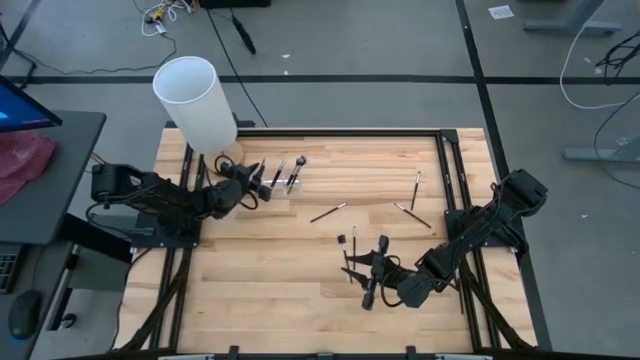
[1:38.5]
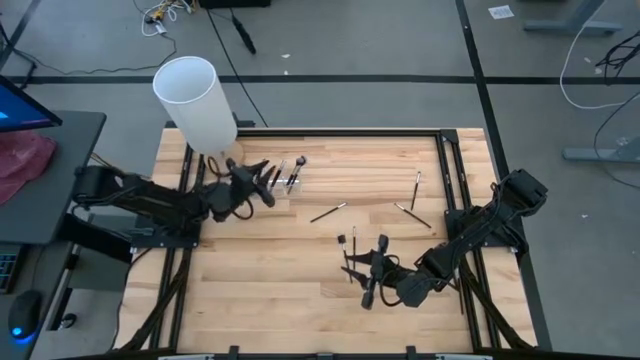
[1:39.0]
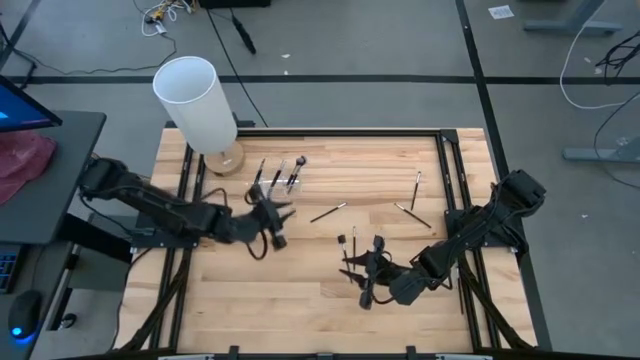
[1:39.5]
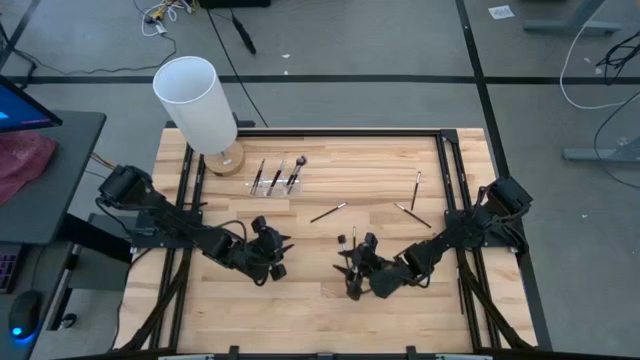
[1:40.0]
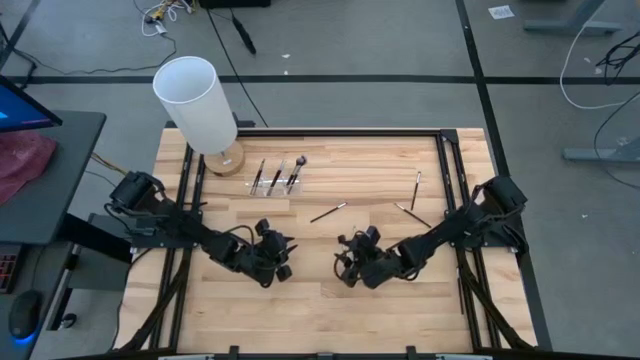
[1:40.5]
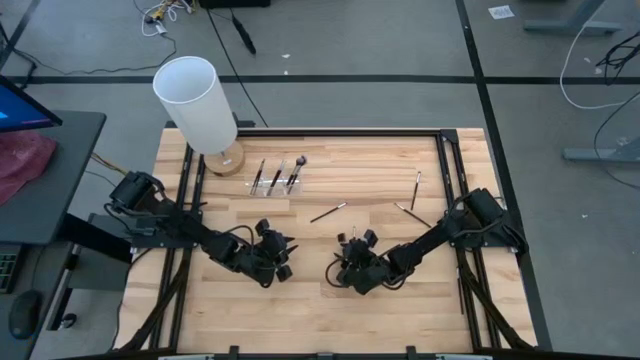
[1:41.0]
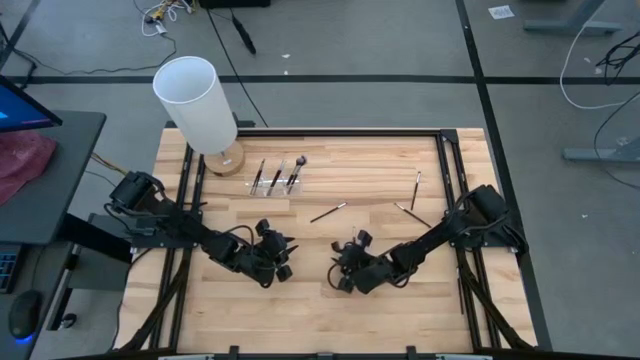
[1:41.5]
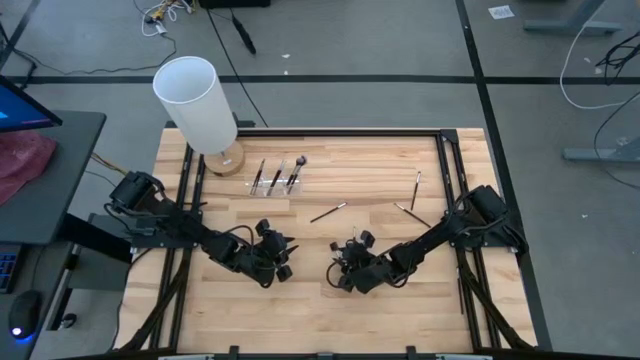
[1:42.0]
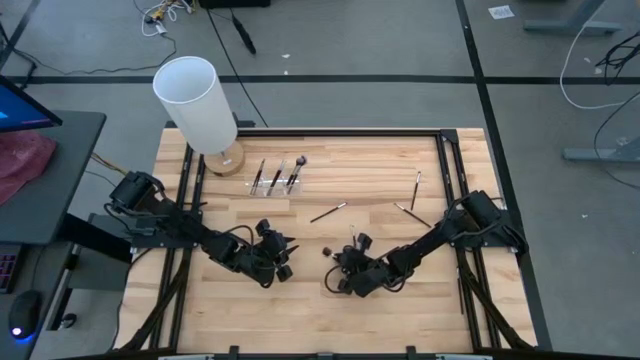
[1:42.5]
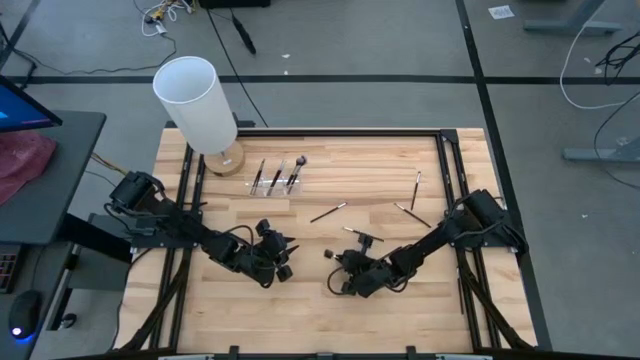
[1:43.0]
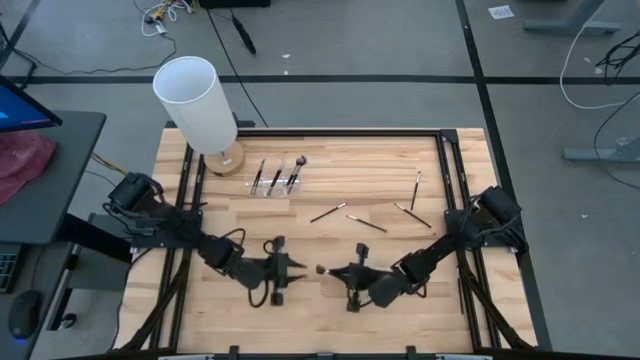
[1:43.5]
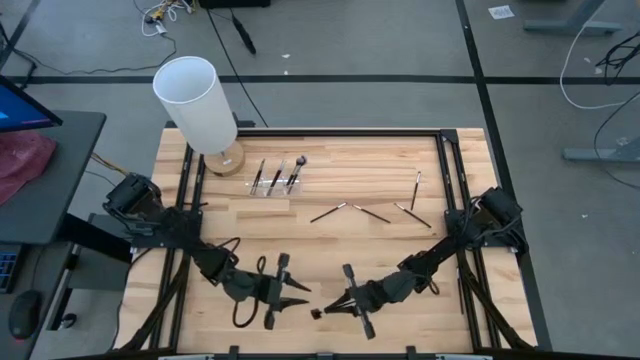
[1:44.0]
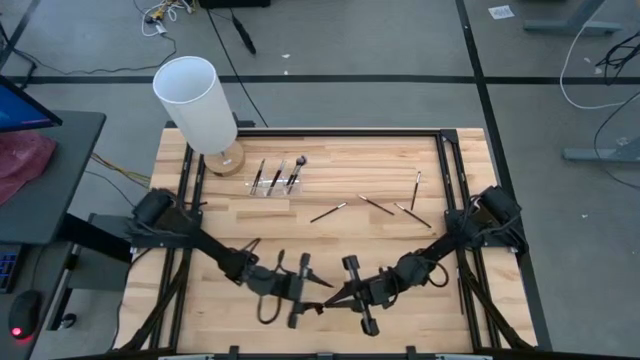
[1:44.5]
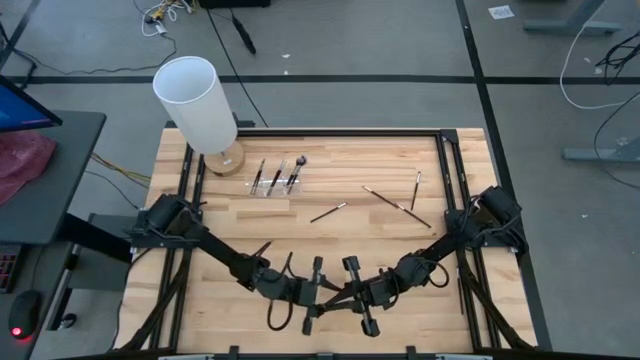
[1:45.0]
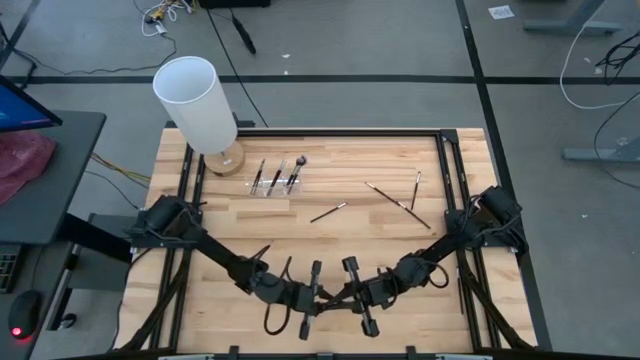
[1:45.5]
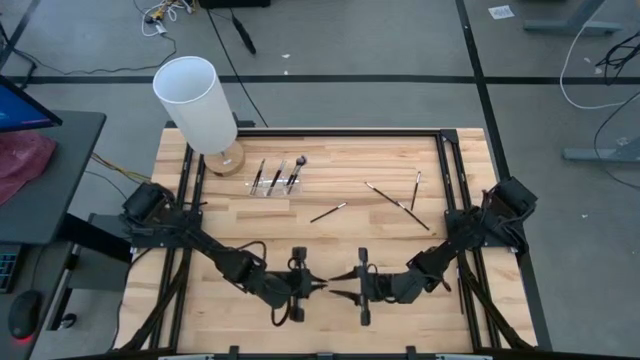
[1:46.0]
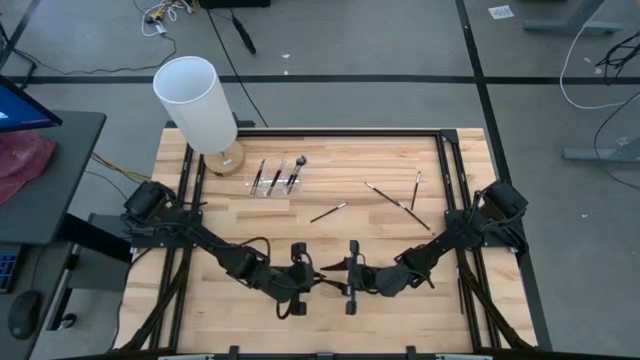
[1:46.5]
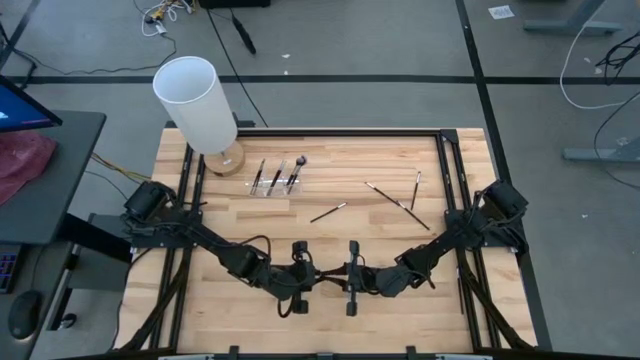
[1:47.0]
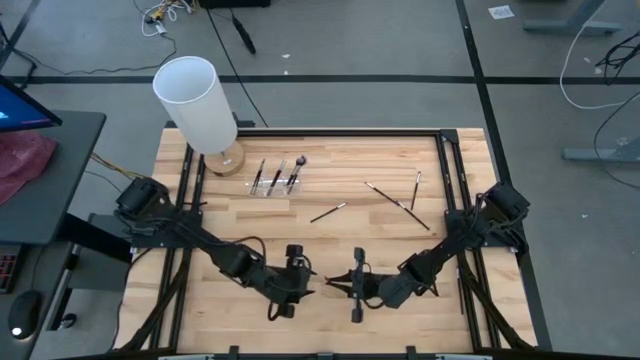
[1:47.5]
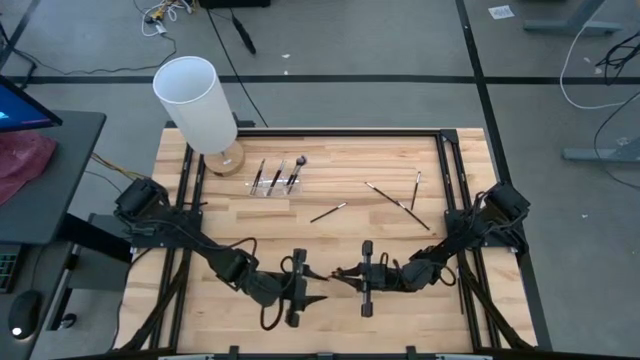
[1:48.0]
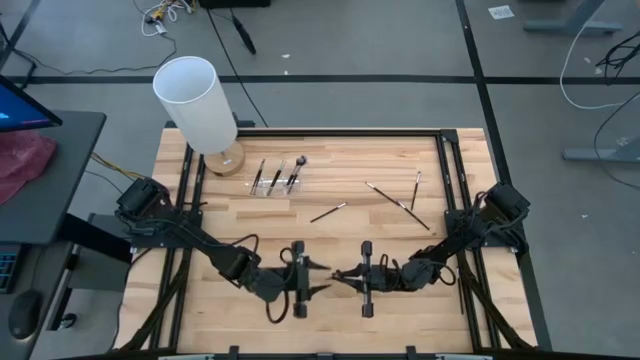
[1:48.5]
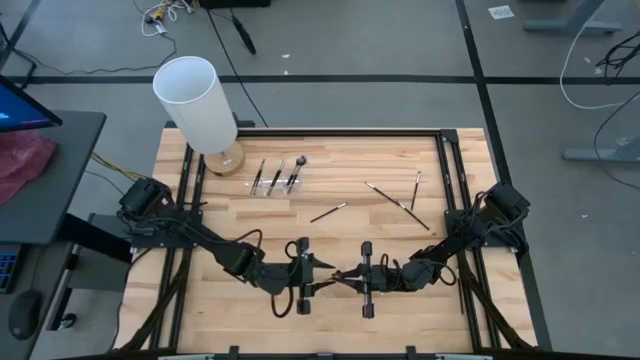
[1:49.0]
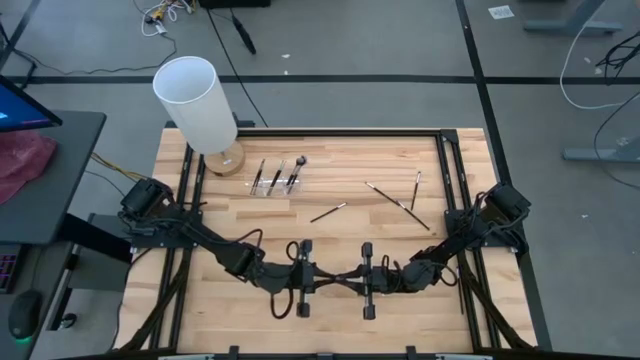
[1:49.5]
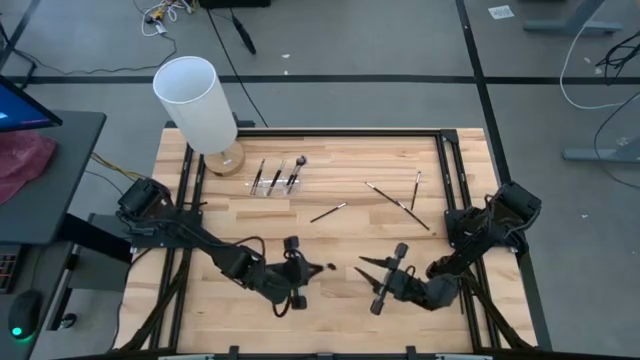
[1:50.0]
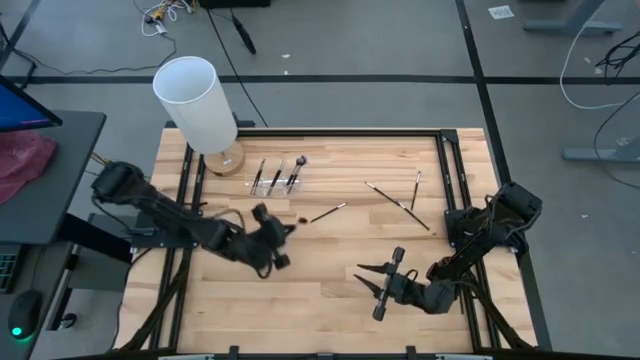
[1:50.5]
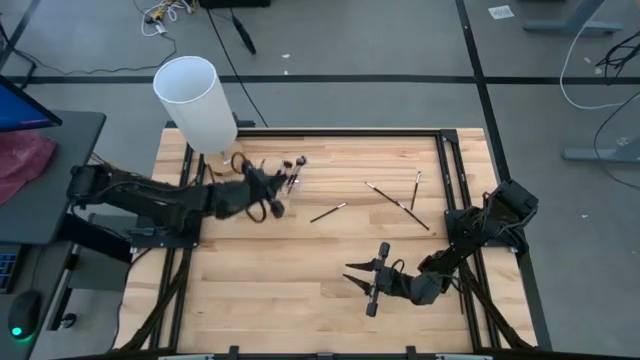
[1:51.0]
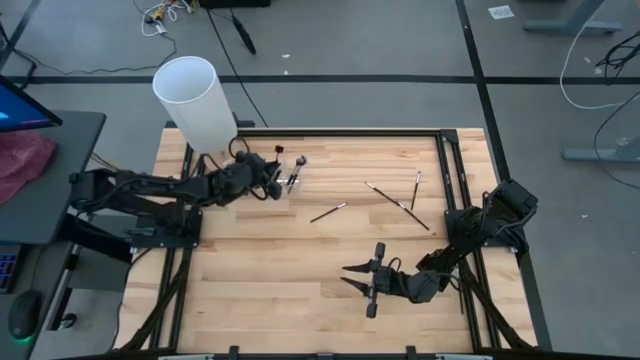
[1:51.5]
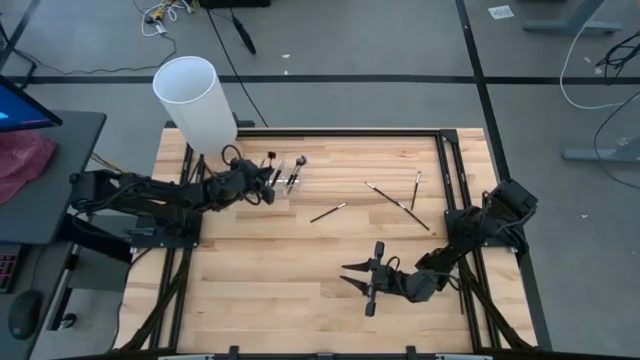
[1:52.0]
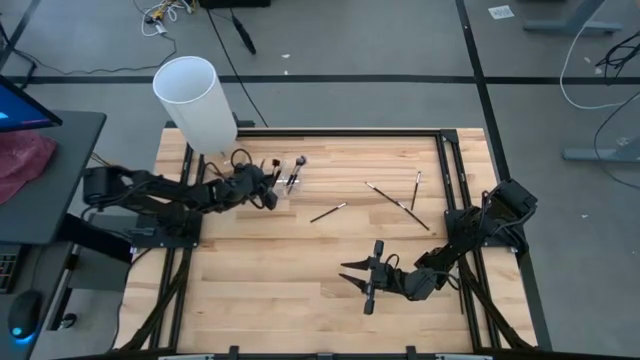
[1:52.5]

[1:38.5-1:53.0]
Task: Put items in baskets/containers
Put the brow brush into the transparent organizer

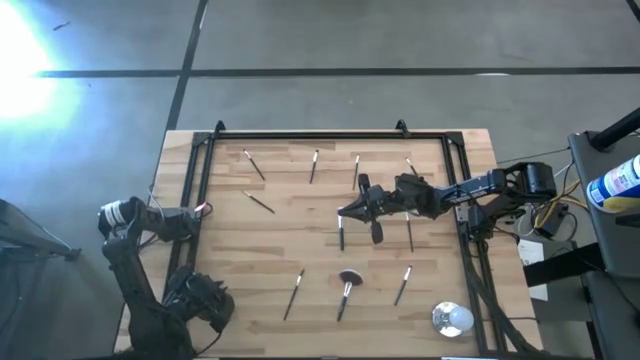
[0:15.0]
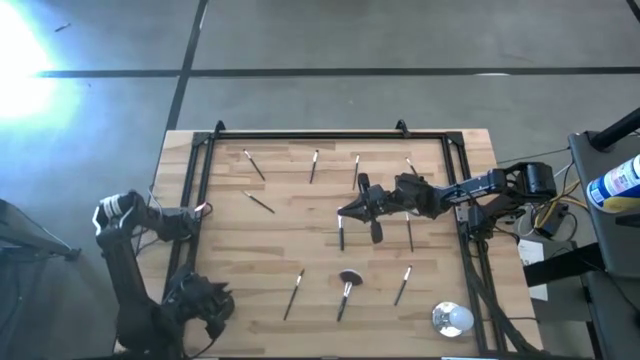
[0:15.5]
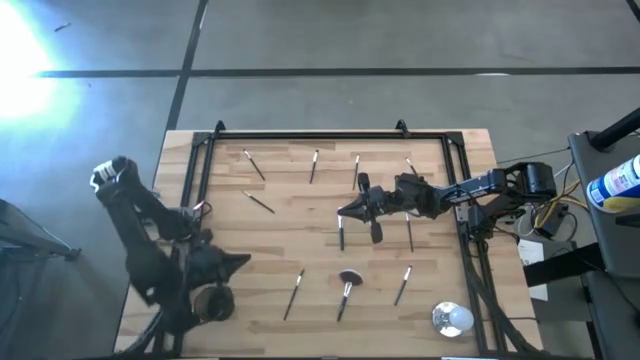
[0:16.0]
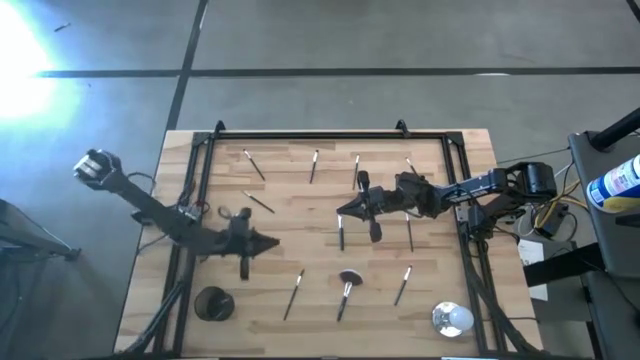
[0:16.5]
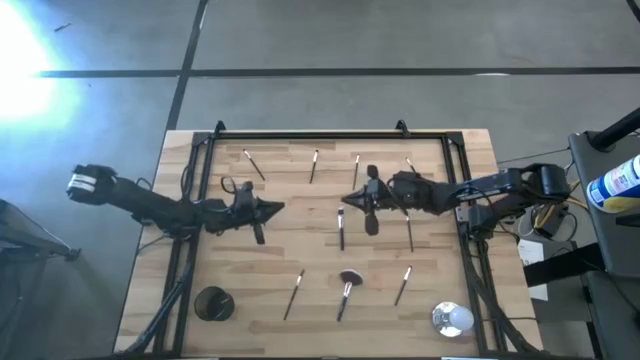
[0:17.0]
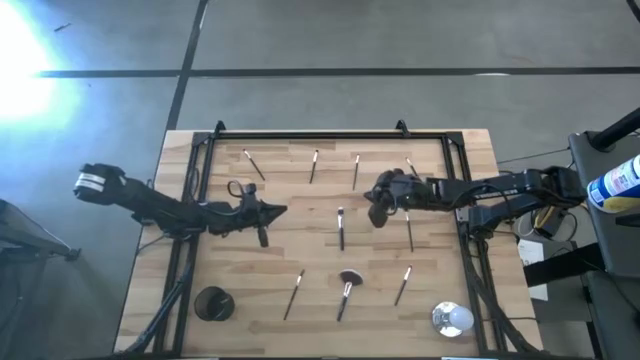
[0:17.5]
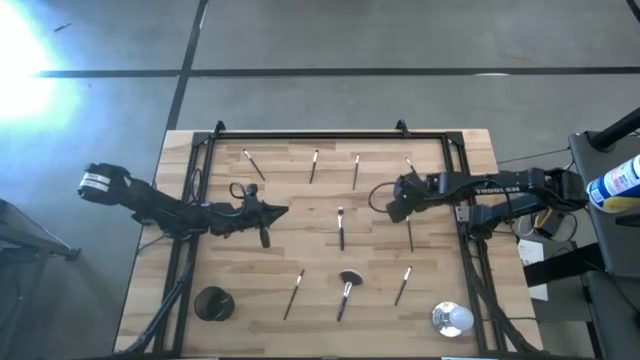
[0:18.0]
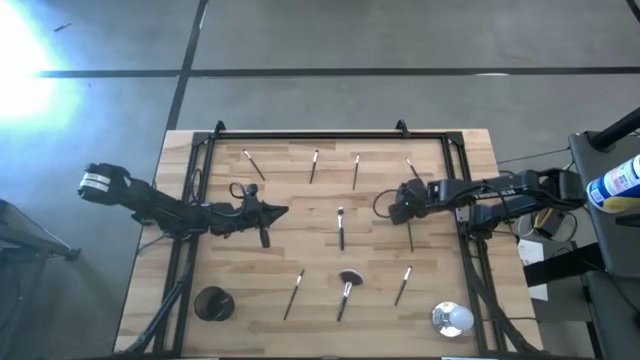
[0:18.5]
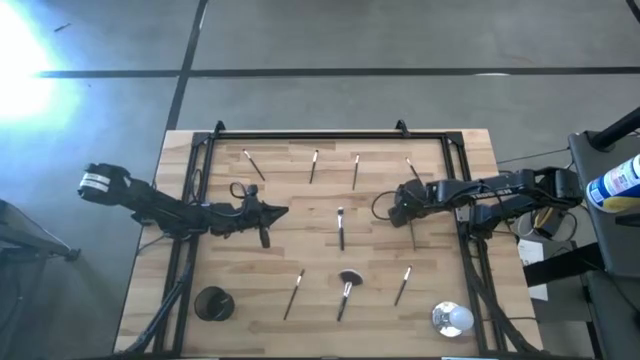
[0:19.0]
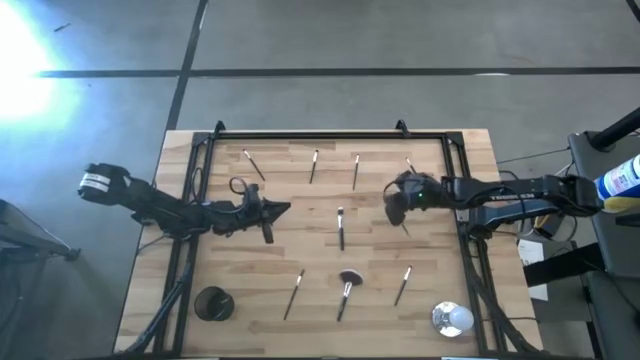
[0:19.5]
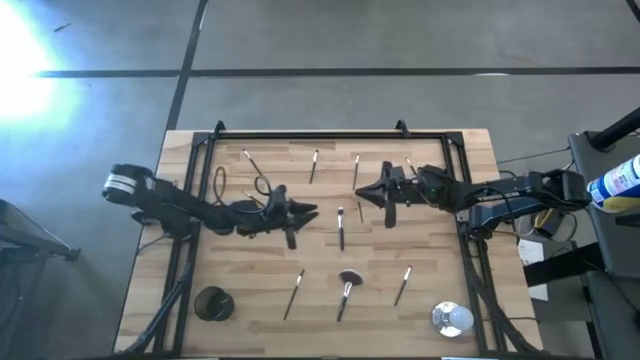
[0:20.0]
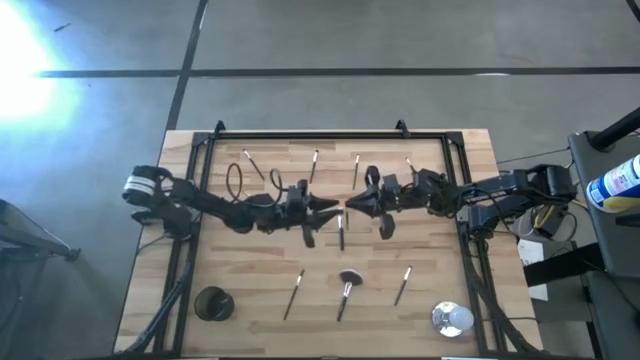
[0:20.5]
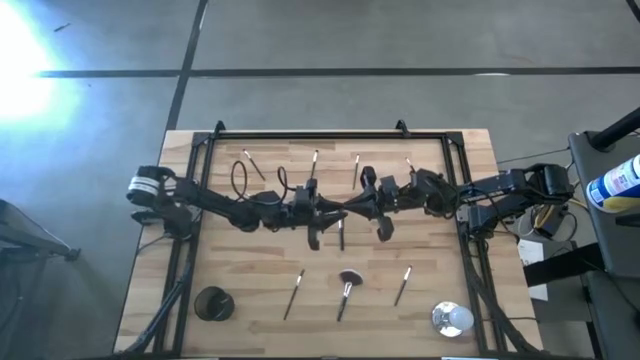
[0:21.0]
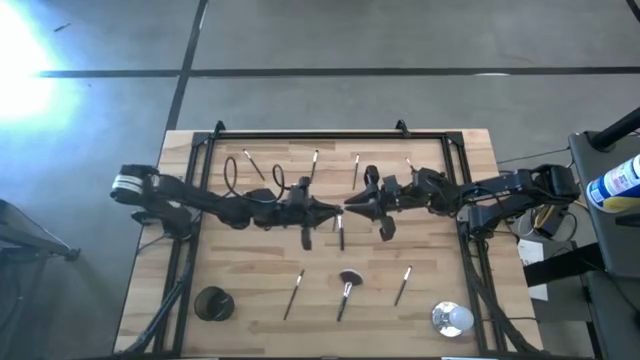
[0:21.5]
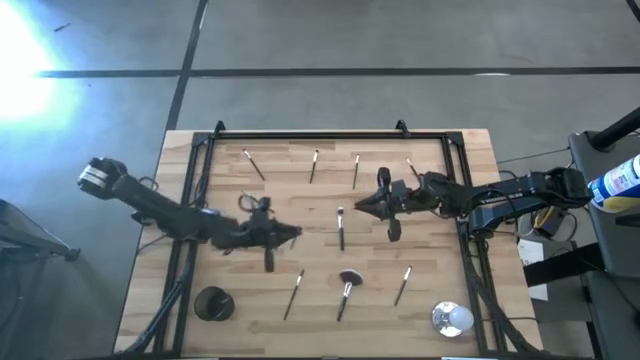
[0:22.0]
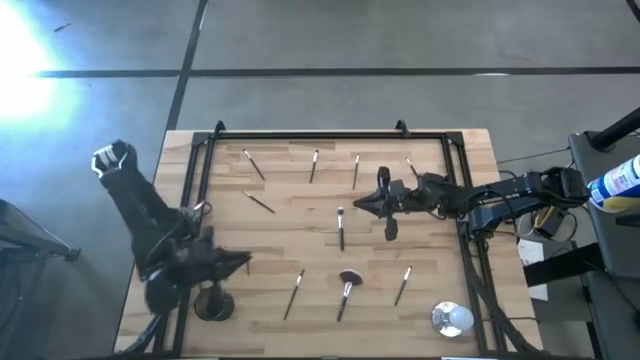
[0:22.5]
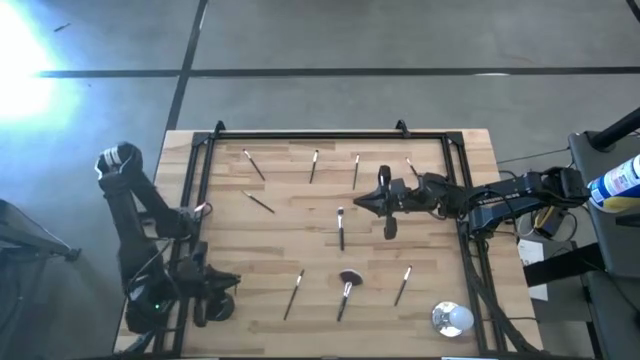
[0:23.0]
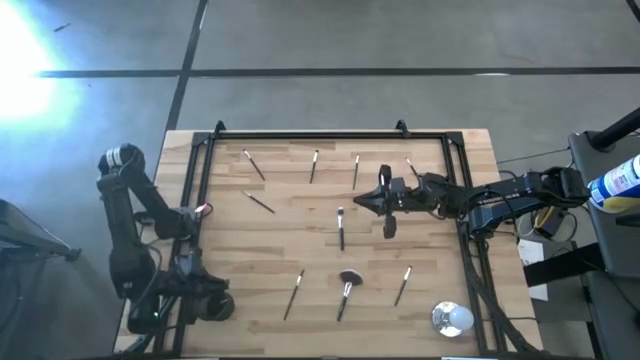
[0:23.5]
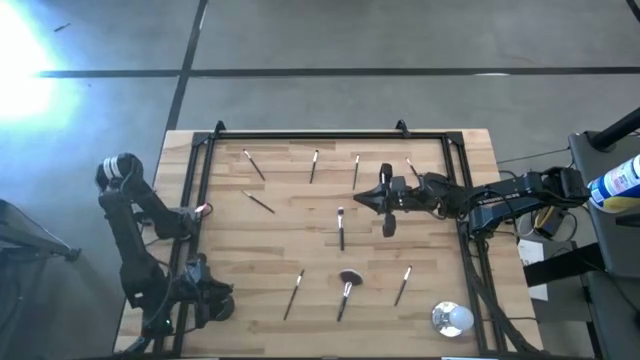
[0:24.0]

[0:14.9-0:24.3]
Task: Pick & Place Makeup Brushes
Put the black eyeshadow brush into the makeup holder
